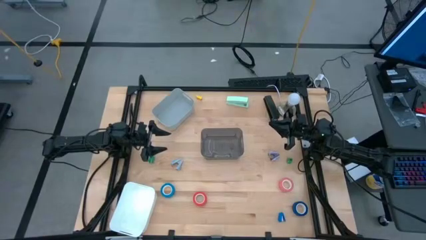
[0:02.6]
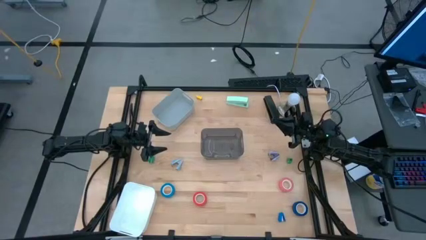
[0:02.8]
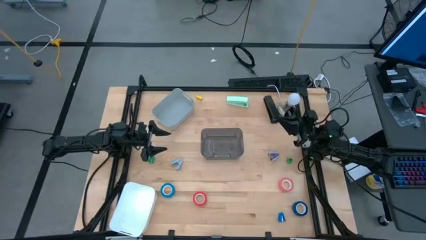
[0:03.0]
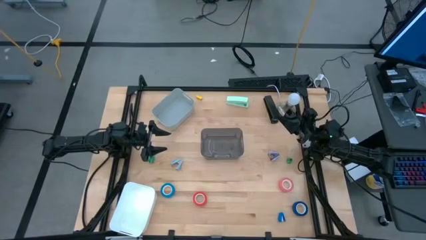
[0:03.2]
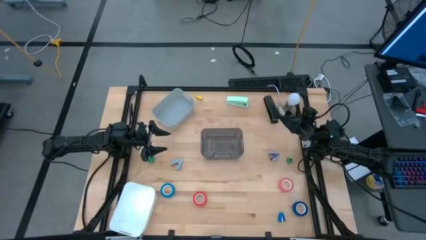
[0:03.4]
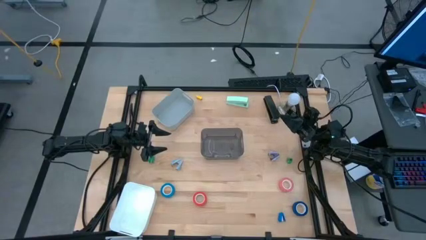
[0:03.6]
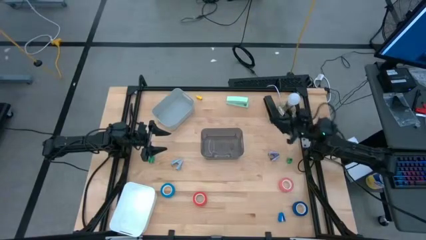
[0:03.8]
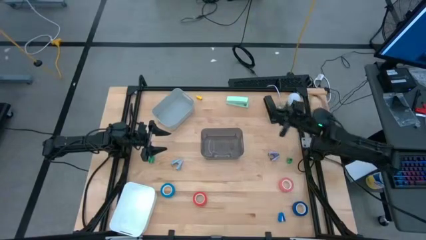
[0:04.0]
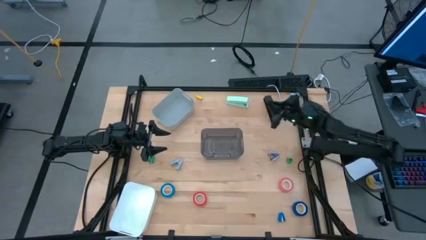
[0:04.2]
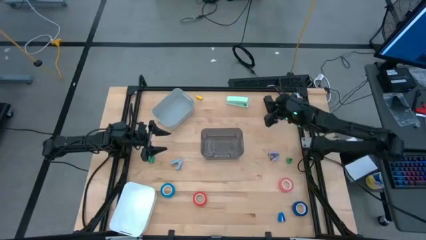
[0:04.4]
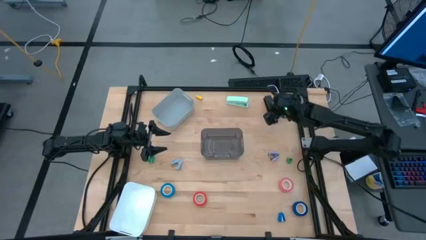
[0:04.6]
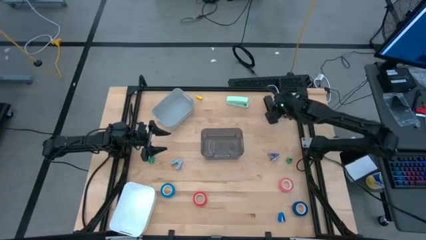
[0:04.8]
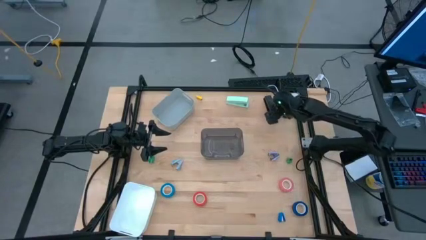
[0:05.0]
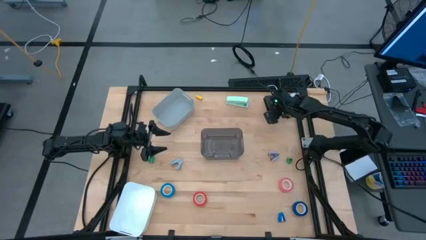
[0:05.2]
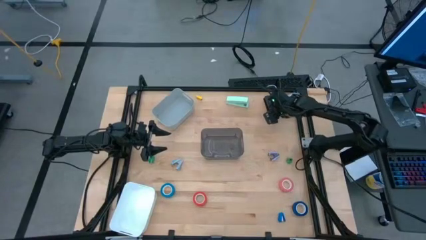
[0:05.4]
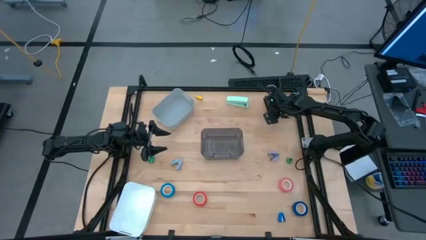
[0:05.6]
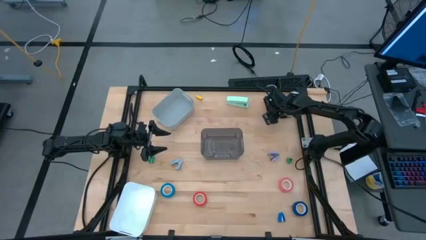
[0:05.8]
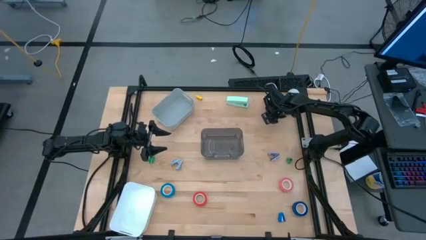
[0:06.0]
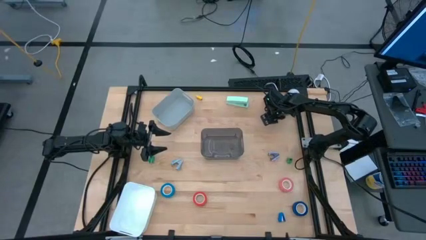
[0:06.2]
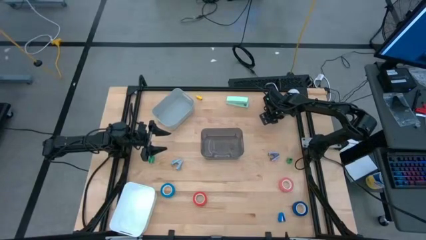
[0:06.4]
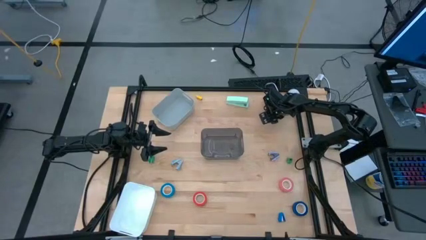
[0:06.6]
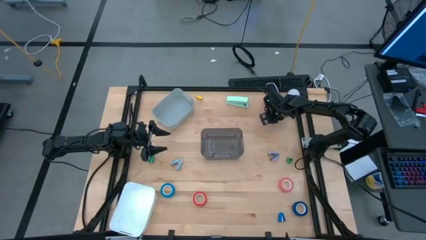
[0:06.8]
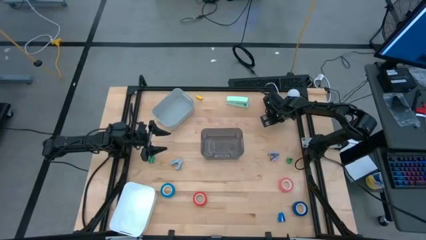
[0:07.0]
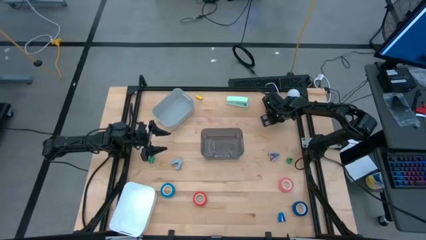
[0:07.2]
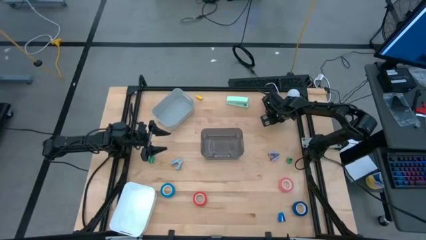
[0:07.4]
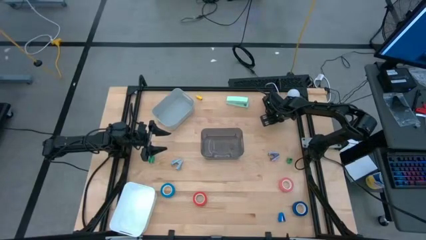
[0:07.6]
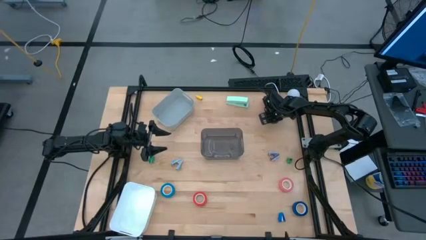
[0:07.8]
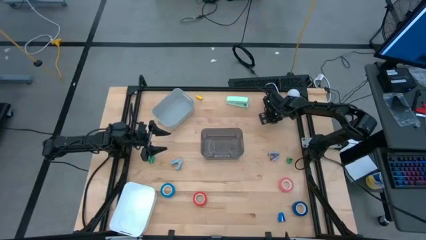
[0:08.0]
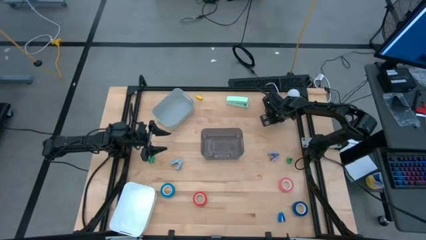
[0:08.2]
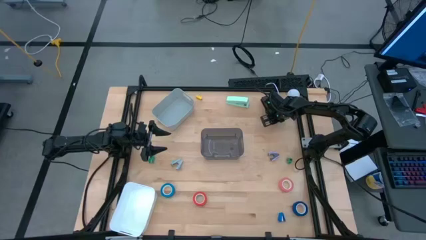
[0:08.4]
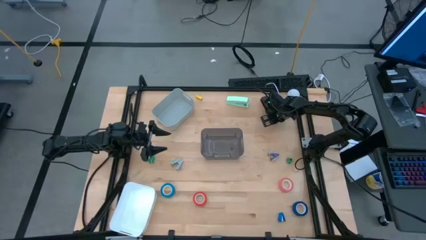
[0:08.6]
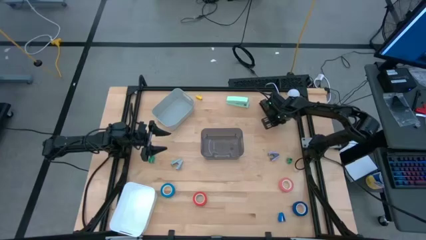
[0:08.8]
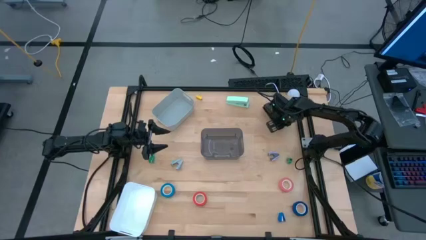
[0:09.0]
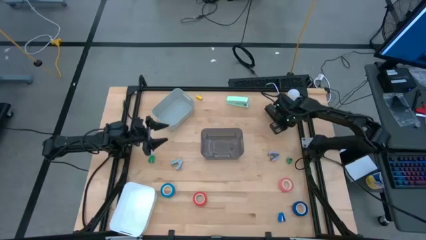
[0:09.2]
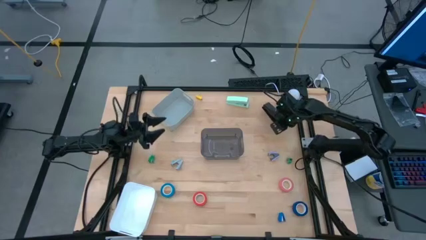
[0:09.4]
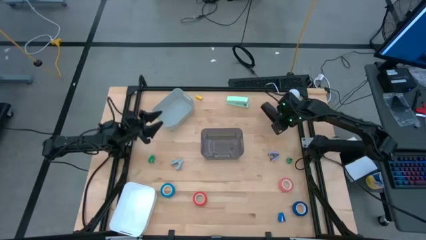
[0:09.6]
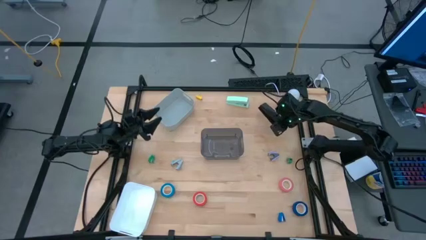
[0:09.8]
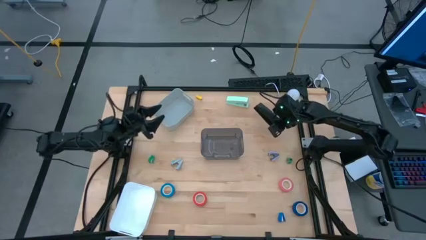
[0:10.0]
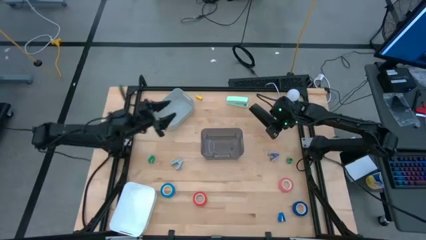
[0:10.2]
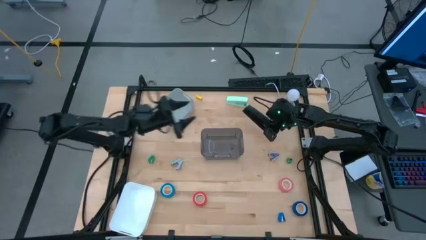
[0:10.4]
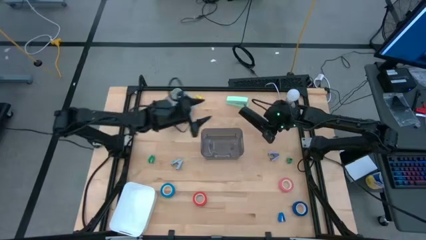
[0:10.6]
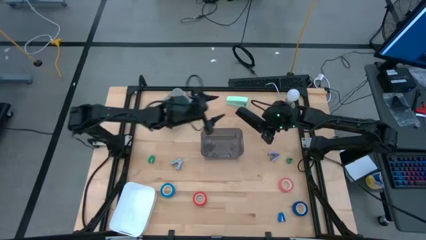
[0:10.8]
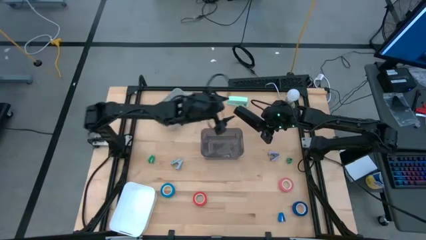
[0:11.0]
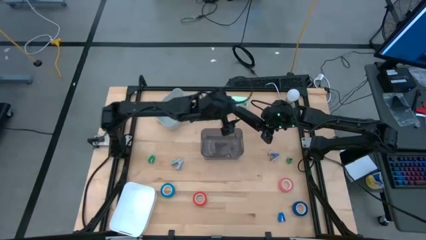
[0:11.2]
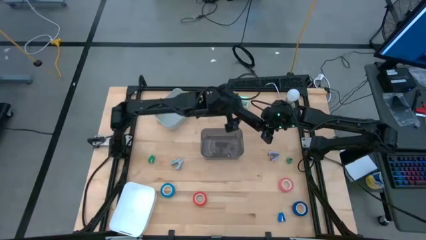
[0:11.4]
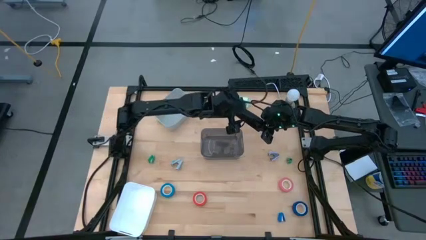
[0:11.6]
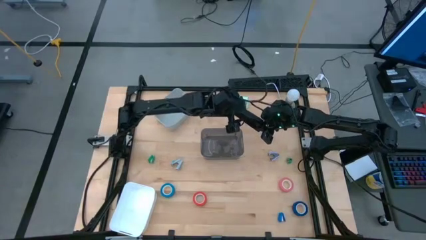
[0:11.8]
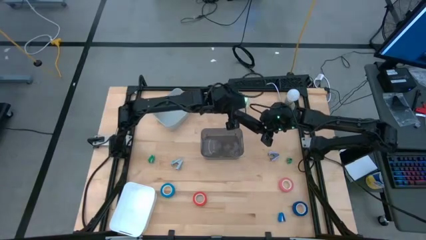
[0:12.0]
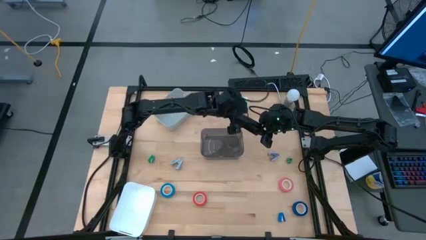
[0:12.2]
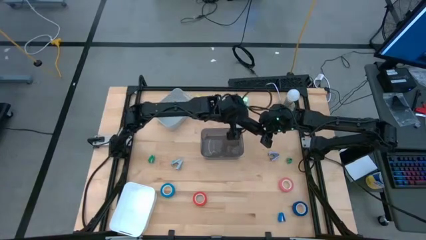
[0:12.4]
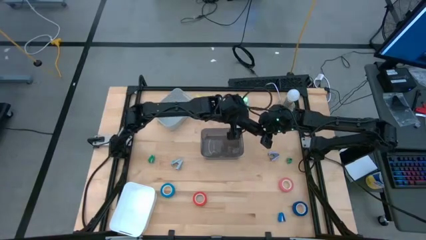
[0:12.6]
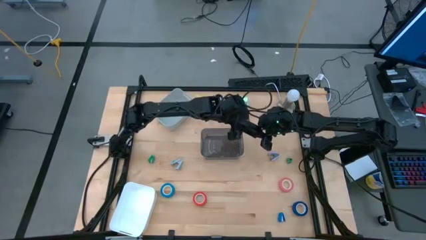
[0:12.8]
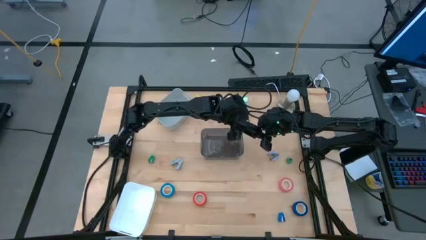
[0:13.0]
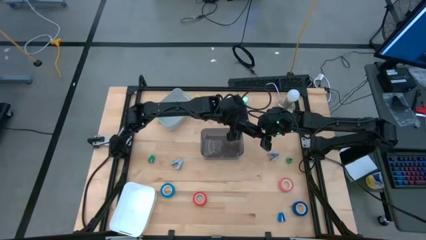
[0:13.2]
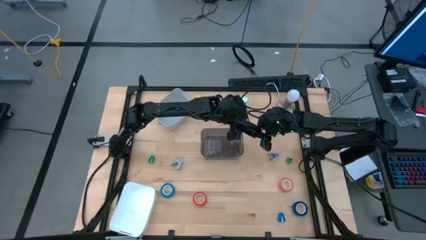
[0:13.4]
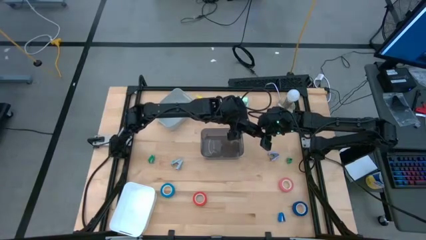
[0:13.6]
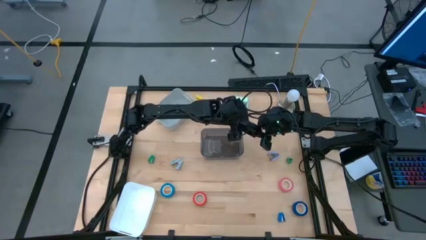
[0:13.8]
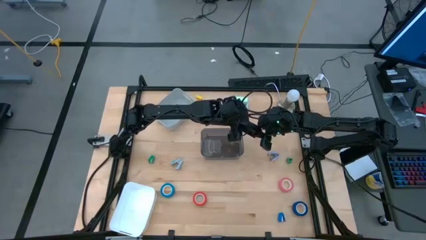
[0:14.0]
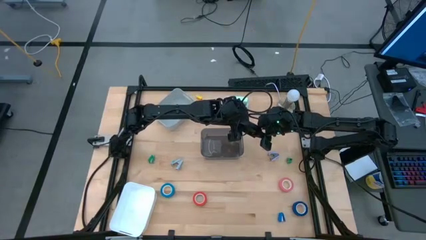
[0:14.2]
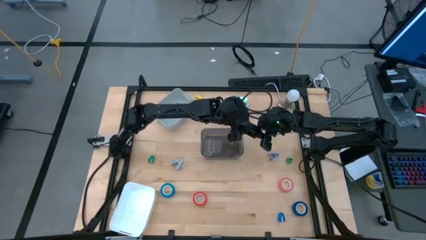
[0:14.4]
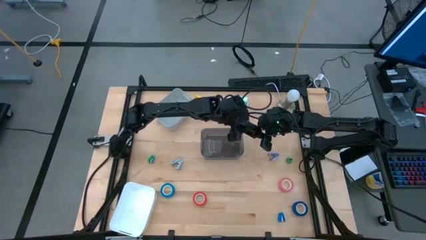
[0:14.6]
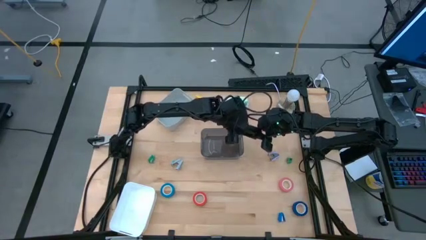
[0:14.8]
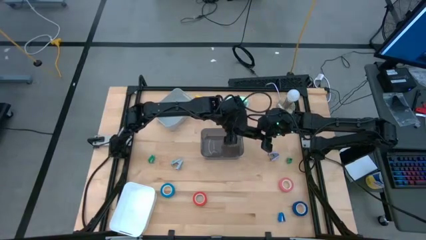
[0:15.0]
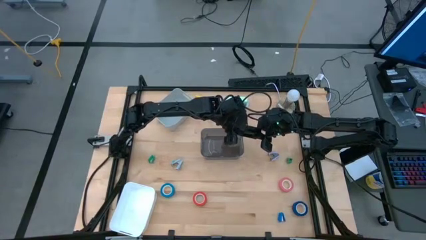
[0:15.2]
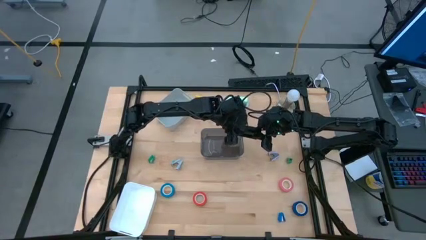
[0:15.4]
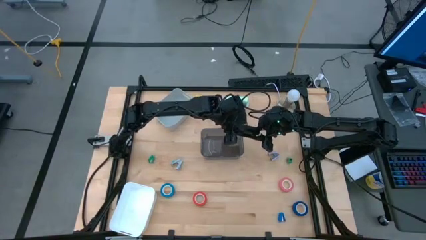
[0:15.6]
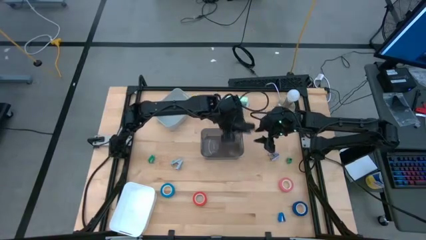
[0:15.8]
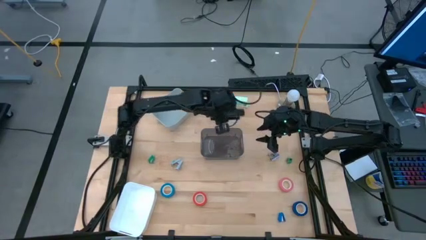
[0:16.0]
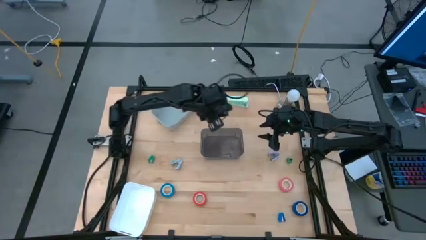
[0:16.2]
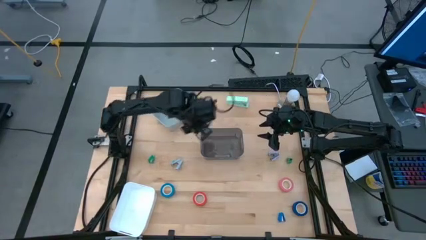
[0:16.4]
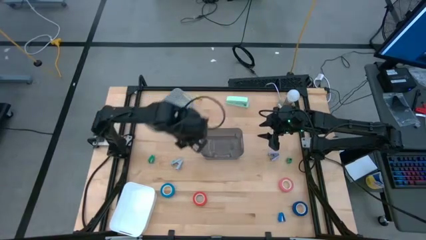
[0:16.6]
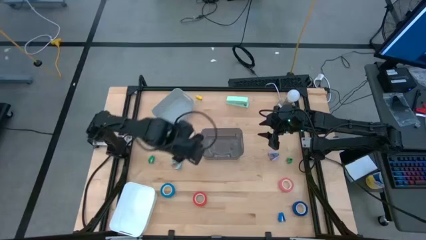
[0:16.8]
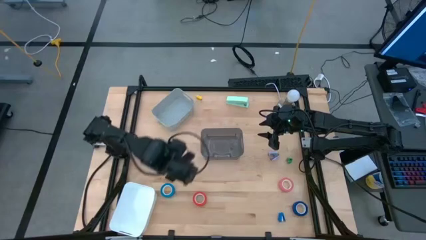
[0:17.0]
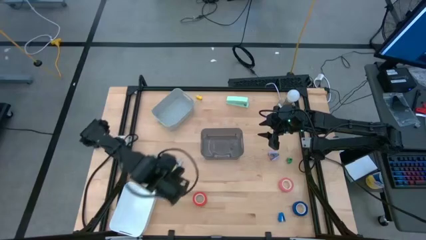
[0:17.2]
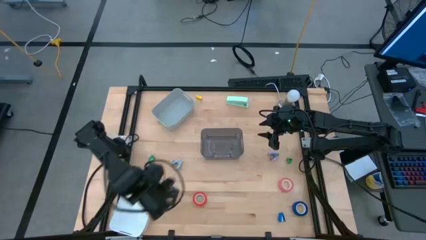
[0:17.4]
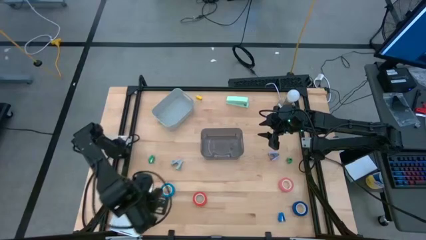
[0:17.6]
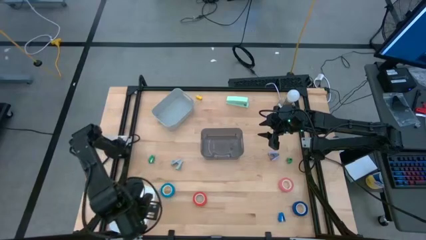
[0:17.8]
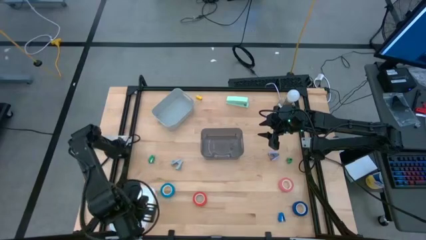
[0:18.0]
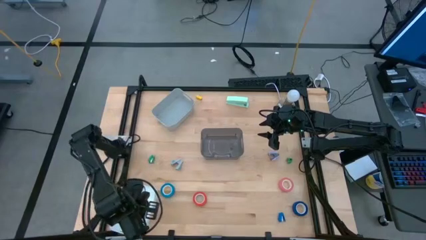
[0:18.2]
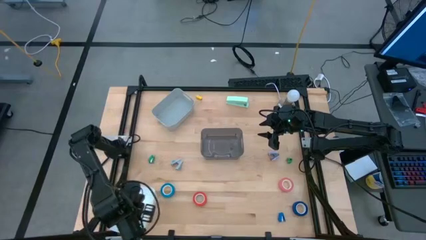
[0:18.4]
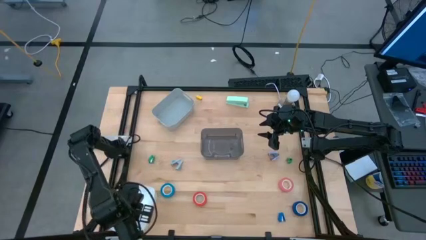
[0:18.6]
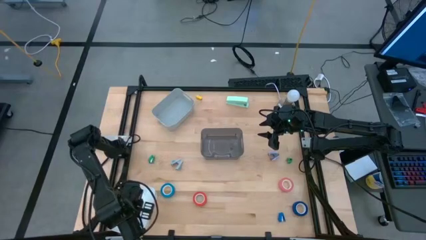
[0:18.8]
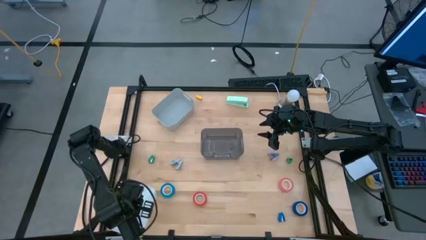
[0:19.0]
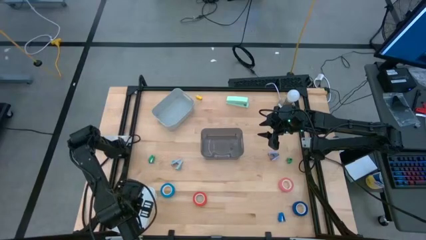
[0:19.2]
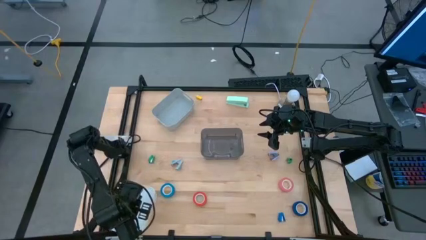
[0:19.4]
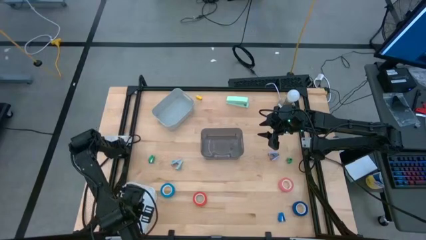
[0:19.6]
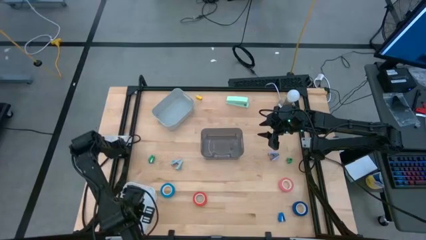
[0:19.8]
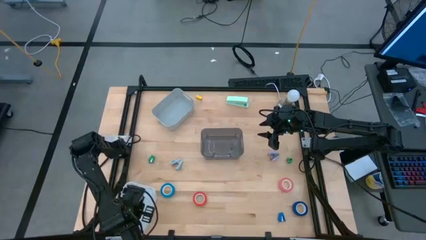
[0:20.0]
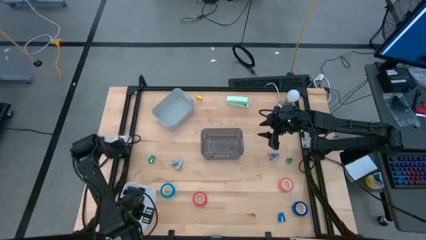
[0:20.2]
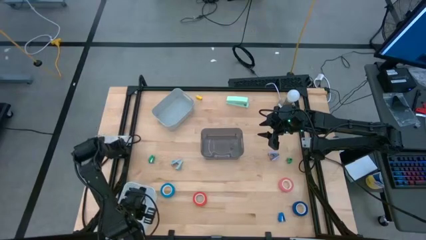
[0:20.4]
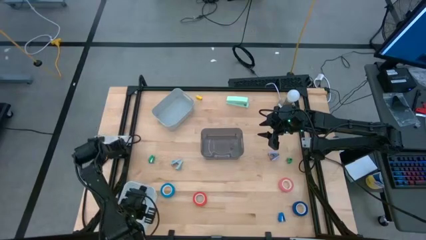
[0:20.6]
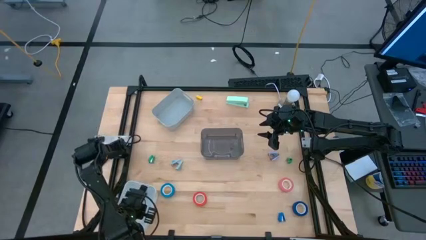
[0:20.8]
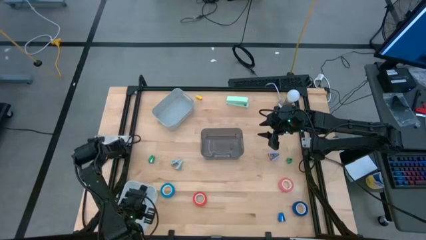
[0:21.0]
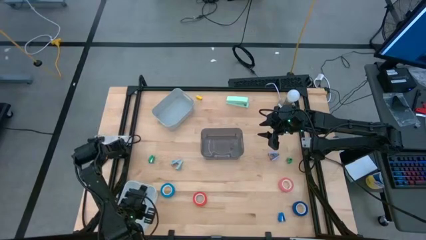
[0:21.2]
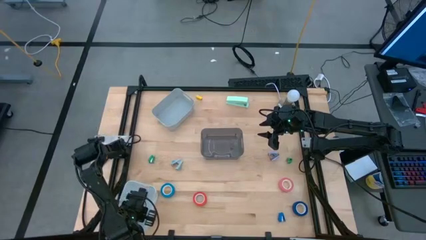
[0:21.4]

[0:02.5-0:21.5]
Task: Pick and place Stapler, Stapler remover, tape
Put the black stapler into the white bin
